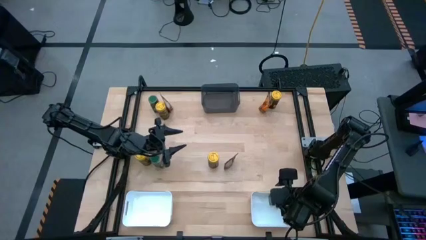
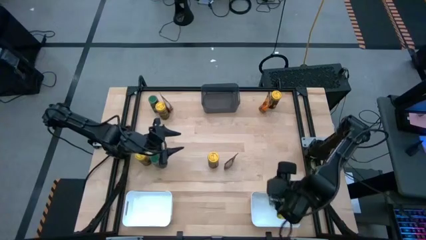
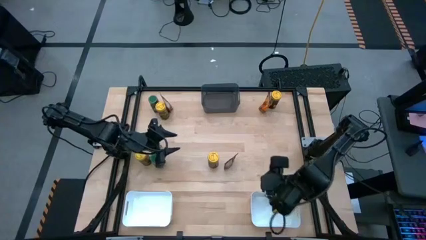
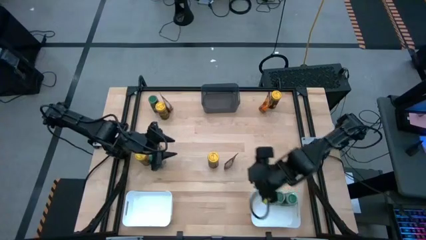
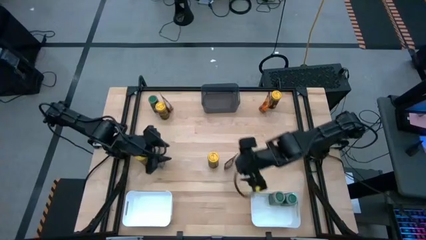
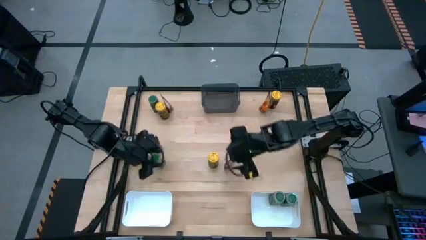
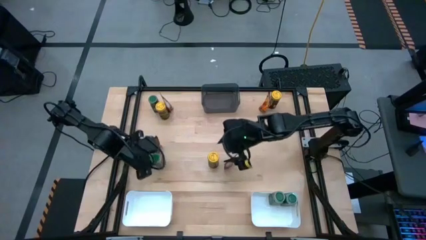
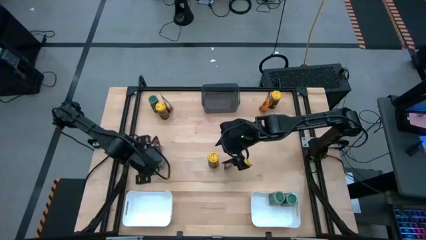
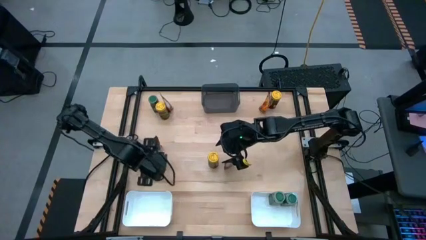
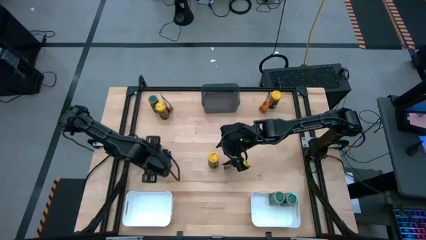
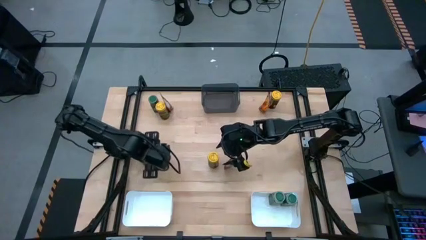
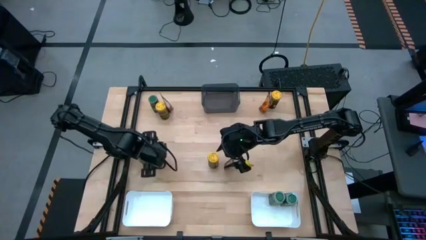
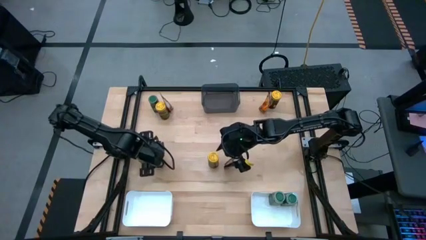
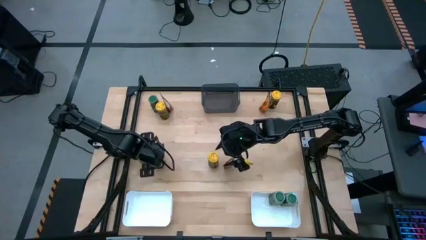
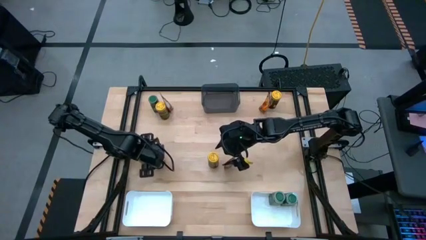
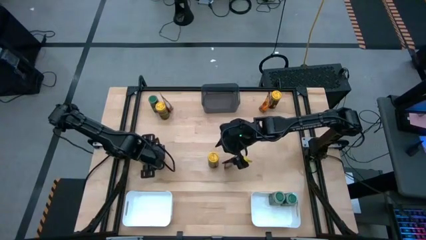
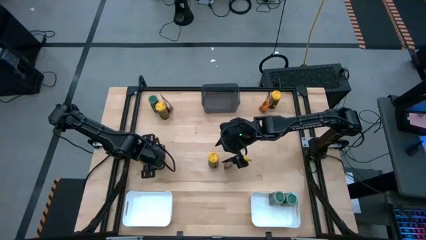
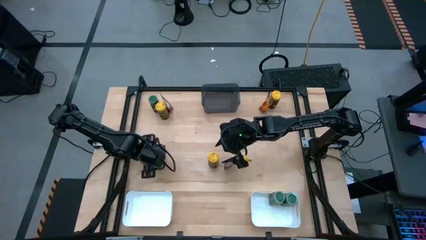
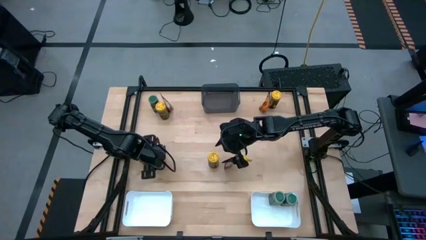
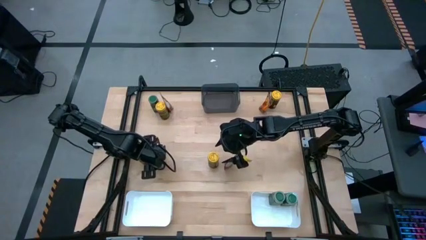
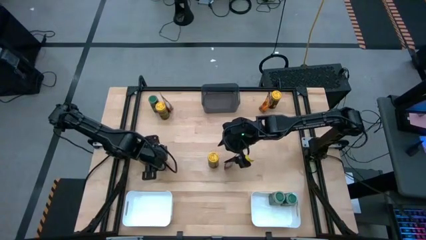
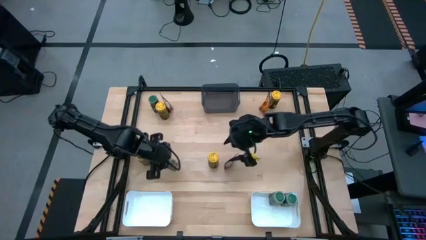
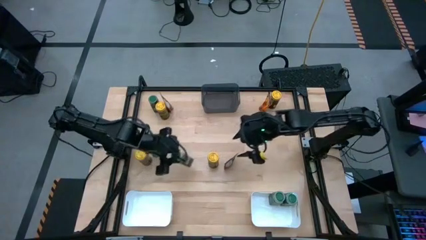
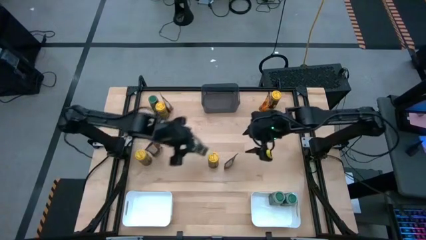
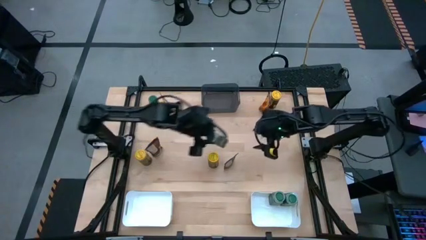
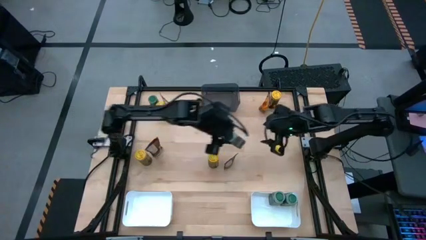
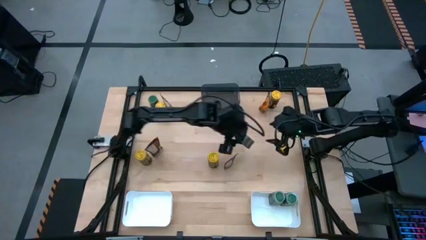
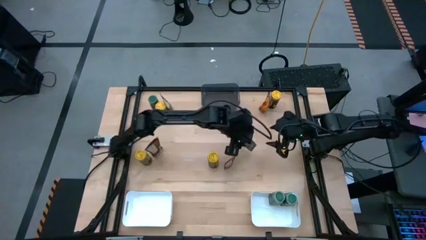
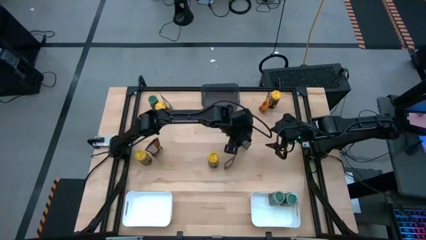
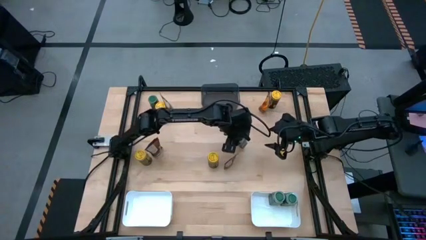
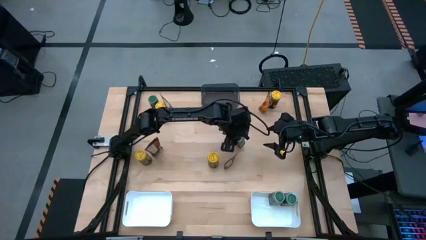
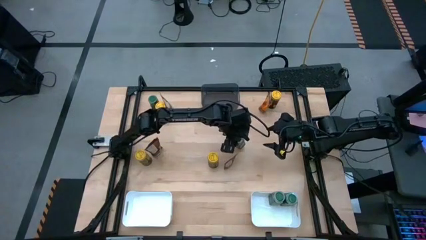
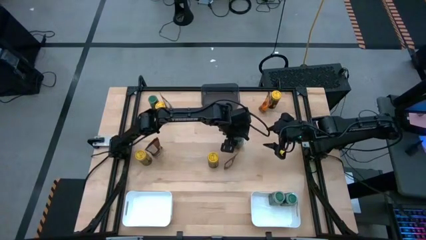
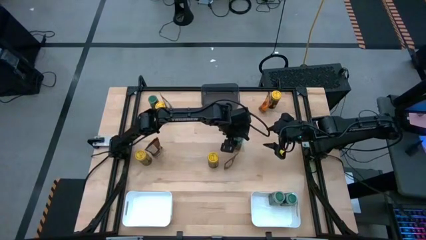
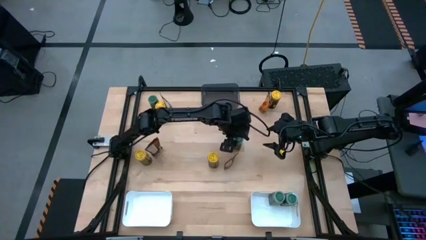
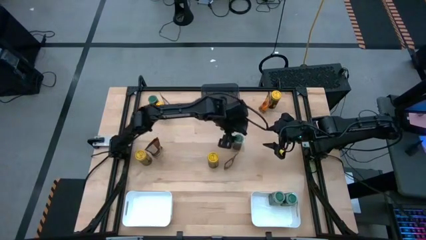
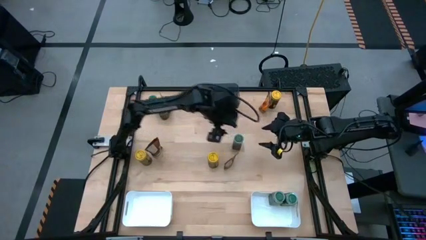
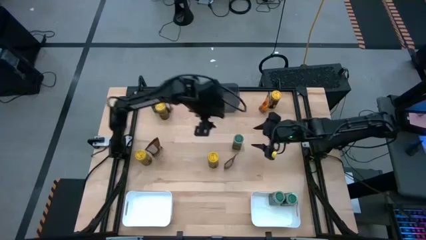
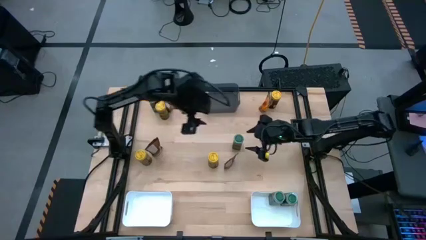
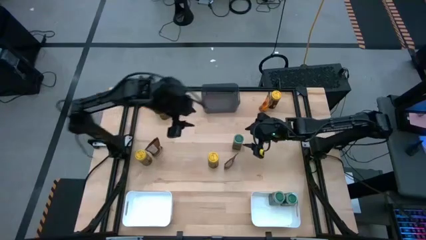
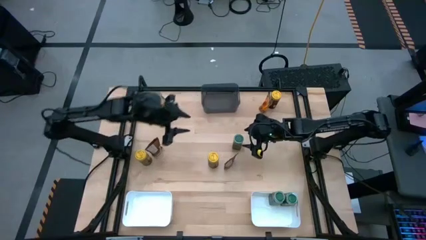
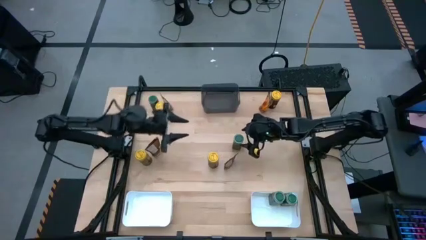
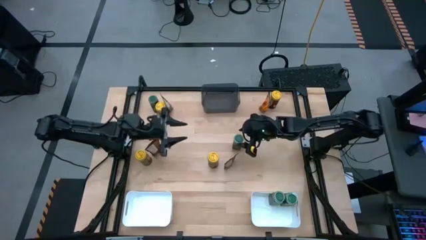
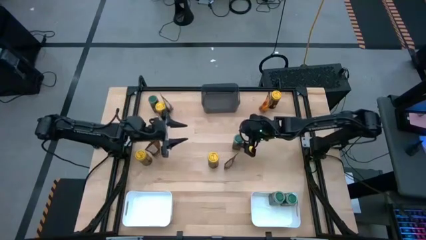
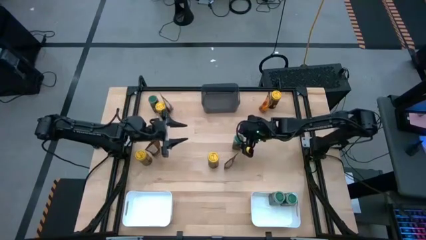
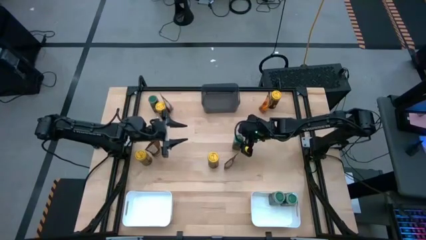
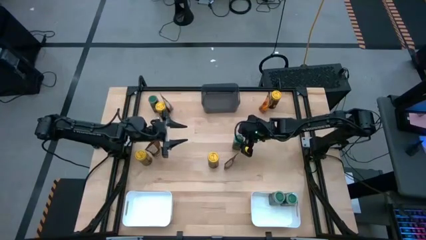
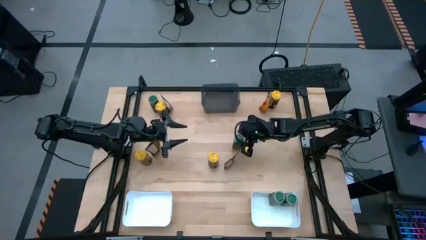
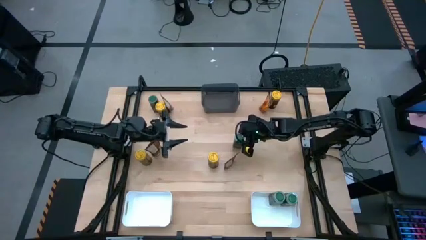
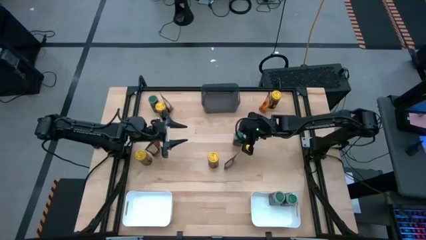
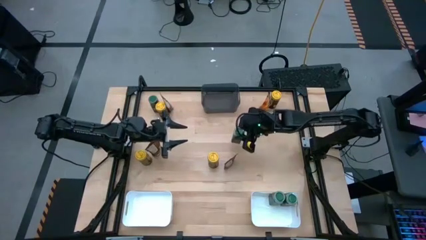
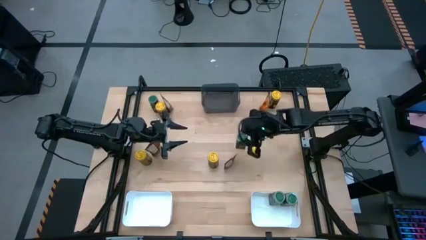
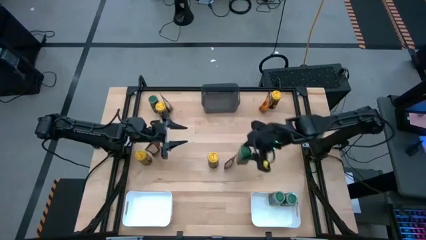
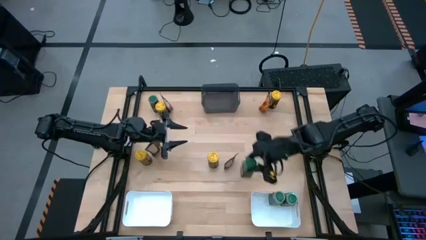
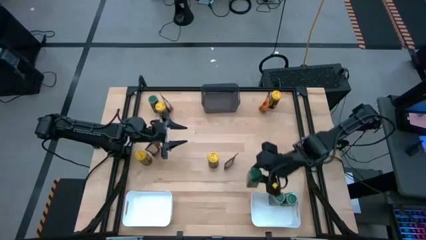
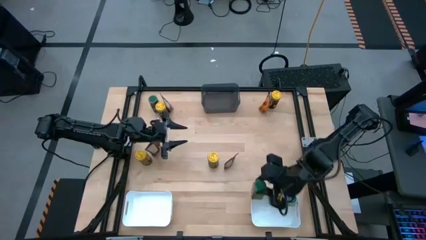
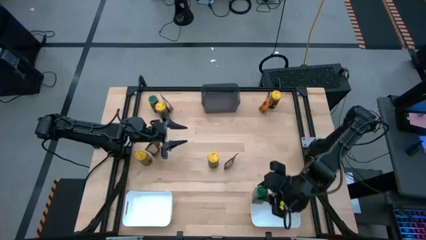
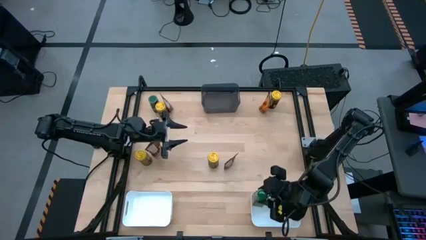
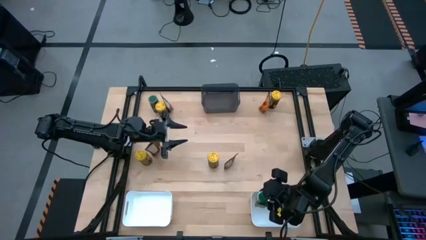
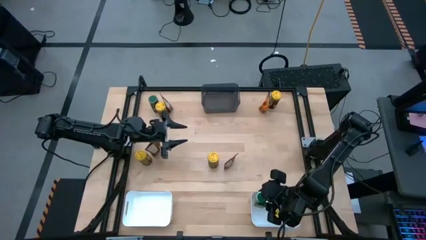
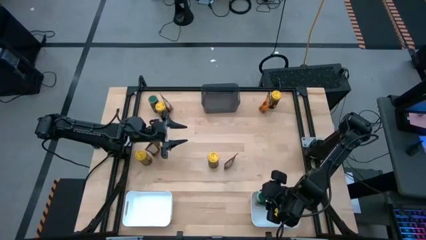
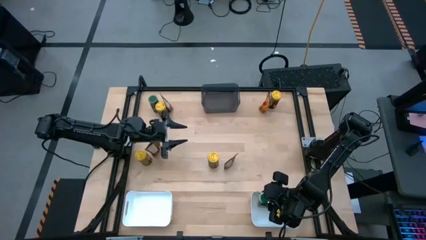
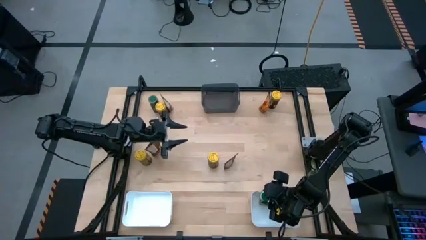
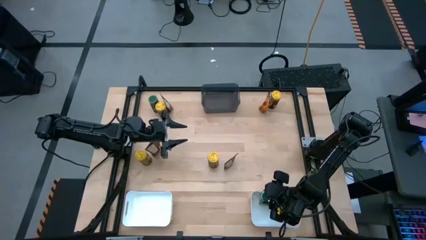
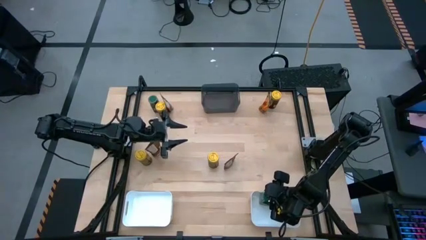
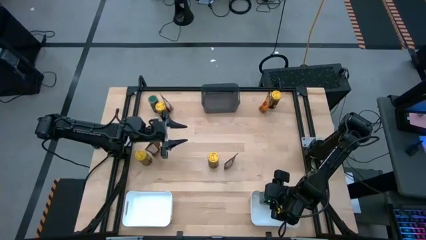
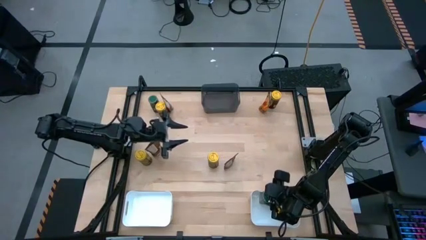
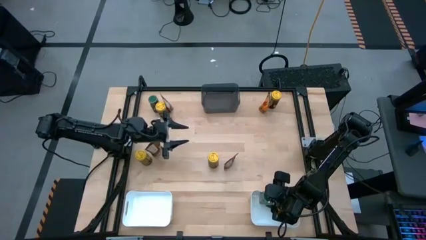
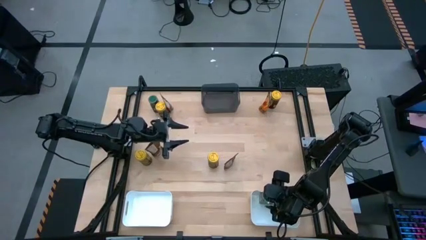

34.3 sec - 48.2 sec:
Task: Sort spices by type
Put the bottom green seasoning bottle into the right white bin

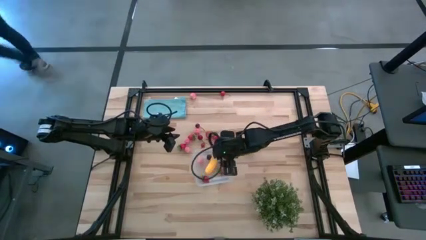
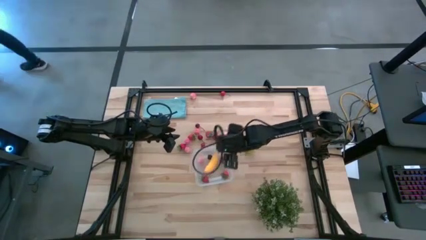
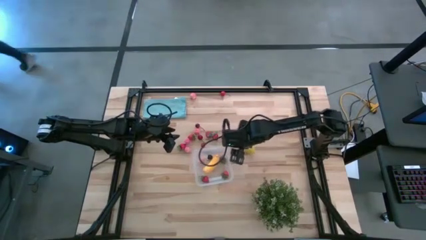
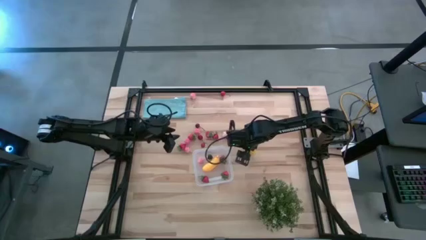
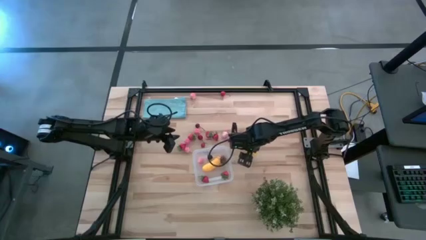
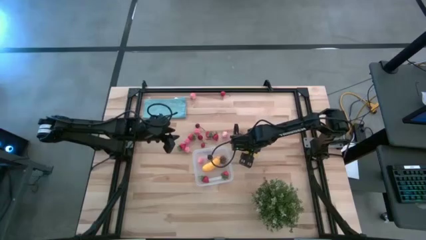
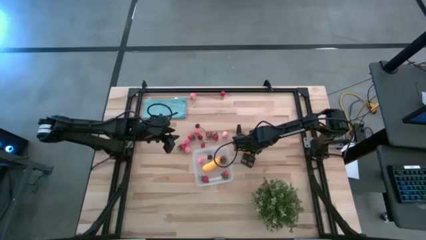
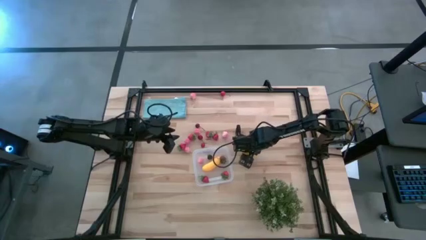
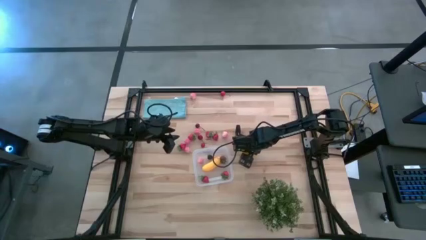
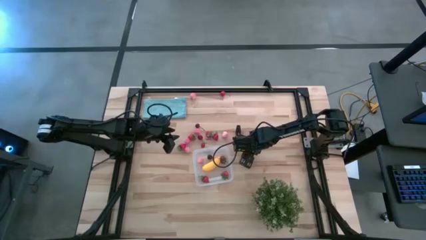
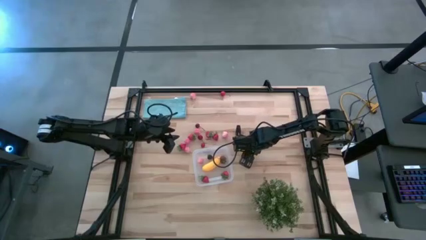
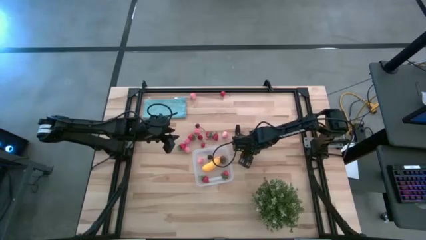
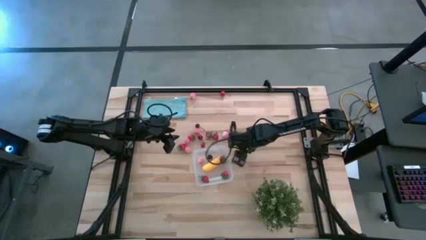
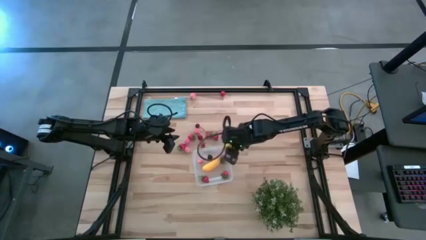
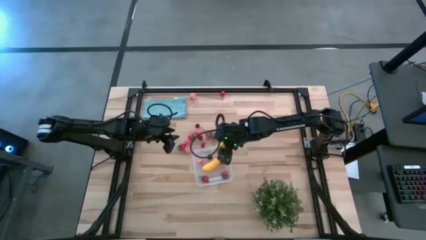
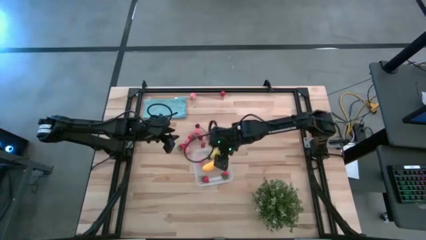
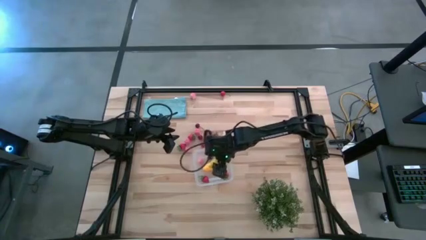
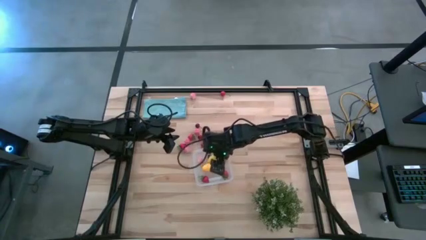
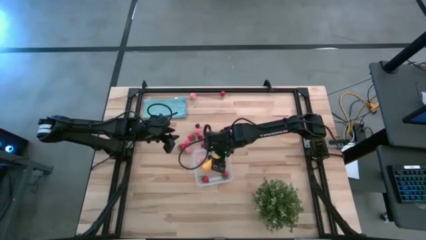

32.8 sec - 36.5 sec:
Task: Pick and placing Produce into tupperware
Put the yellow lemon into the transparent bin
